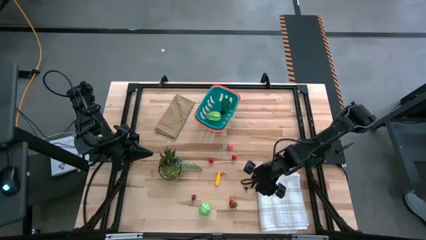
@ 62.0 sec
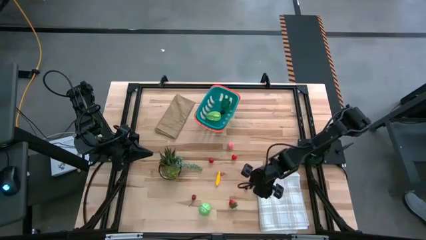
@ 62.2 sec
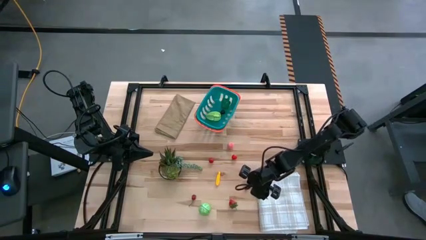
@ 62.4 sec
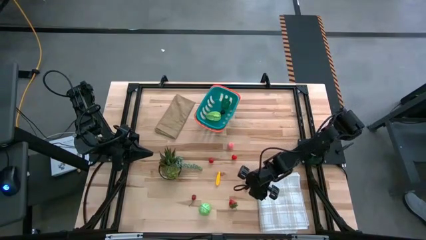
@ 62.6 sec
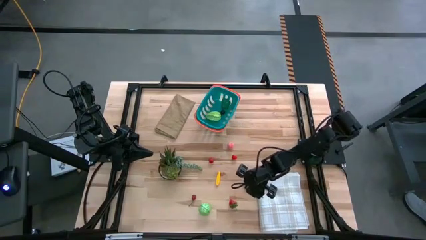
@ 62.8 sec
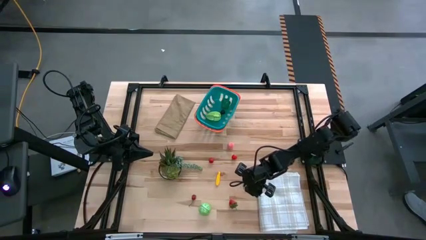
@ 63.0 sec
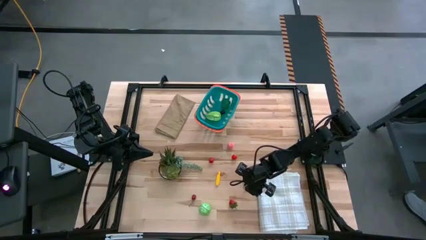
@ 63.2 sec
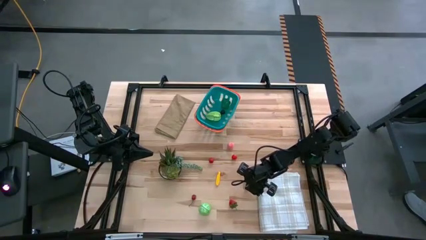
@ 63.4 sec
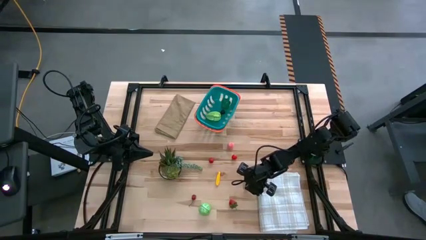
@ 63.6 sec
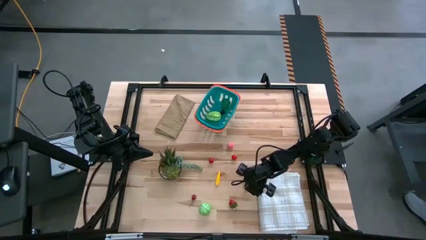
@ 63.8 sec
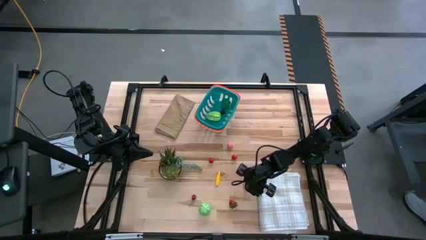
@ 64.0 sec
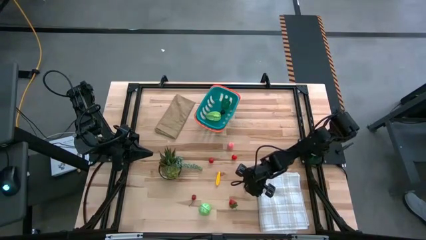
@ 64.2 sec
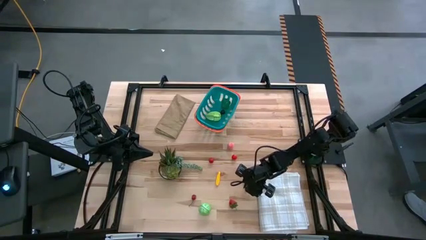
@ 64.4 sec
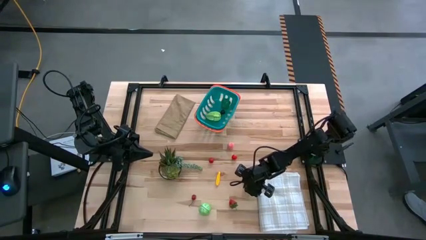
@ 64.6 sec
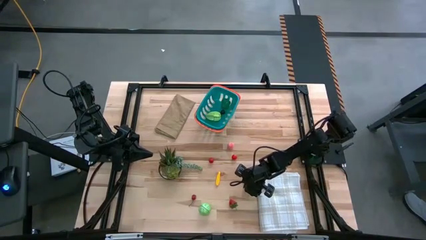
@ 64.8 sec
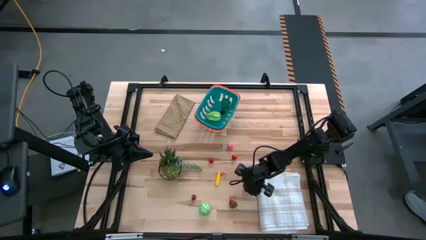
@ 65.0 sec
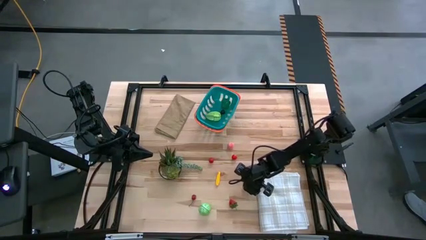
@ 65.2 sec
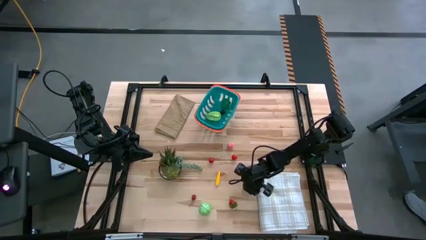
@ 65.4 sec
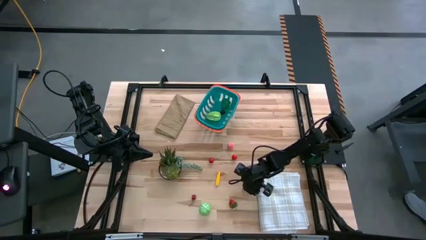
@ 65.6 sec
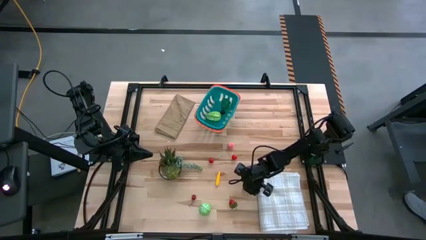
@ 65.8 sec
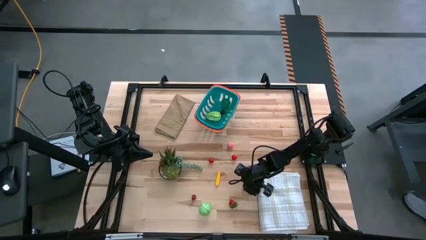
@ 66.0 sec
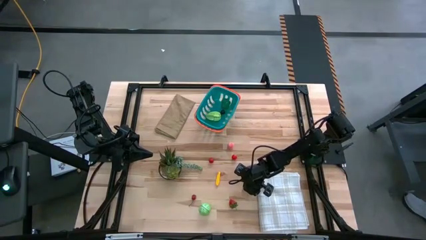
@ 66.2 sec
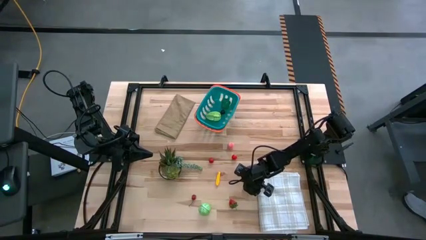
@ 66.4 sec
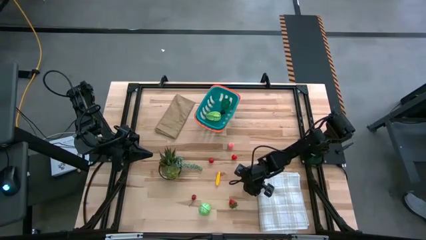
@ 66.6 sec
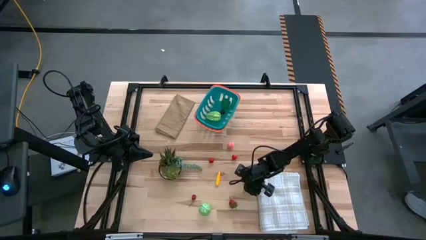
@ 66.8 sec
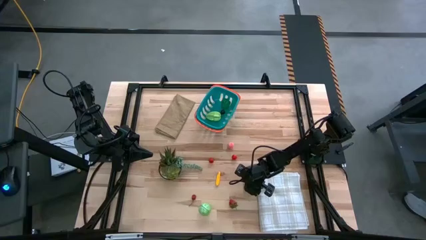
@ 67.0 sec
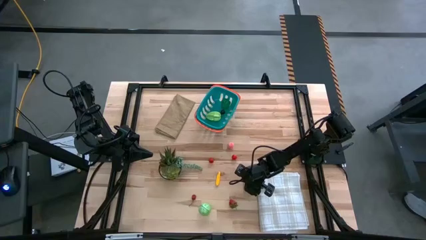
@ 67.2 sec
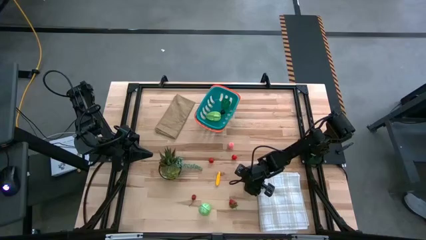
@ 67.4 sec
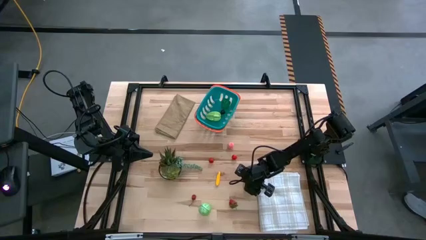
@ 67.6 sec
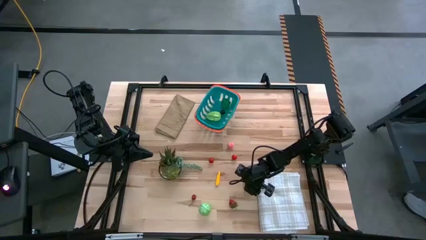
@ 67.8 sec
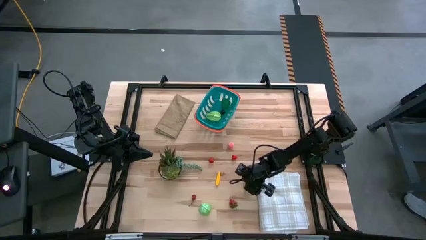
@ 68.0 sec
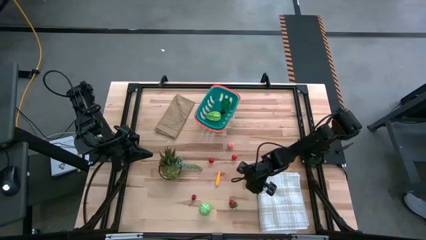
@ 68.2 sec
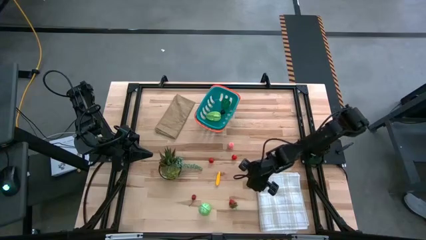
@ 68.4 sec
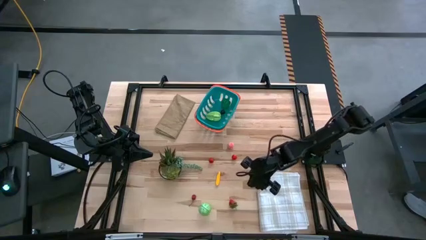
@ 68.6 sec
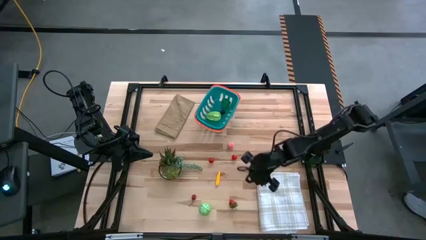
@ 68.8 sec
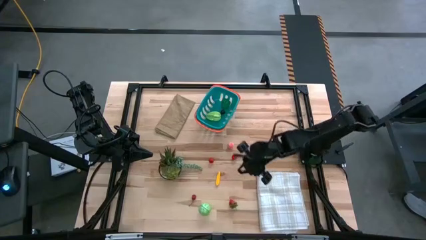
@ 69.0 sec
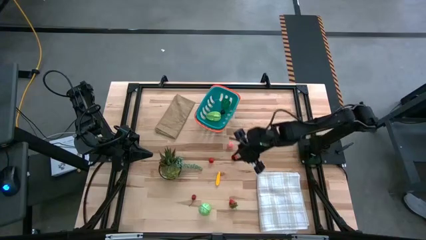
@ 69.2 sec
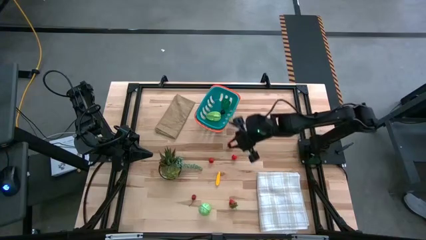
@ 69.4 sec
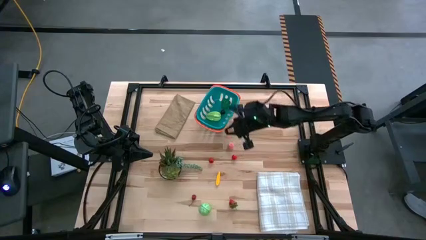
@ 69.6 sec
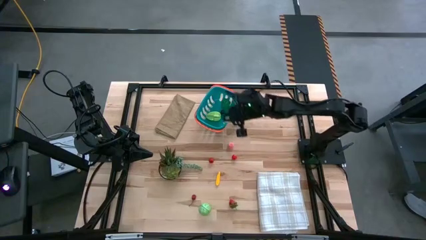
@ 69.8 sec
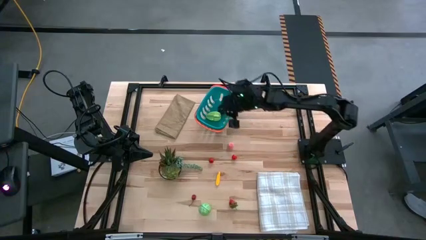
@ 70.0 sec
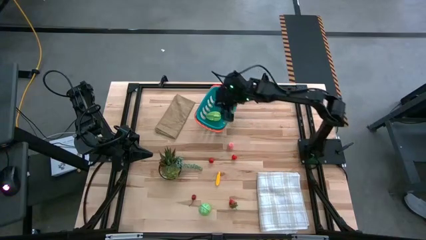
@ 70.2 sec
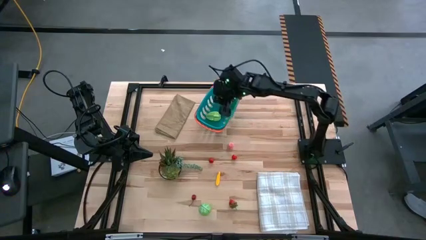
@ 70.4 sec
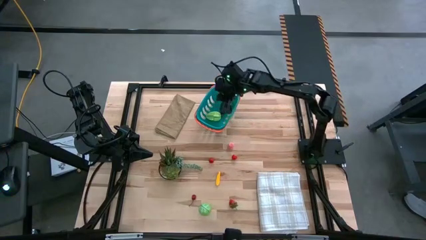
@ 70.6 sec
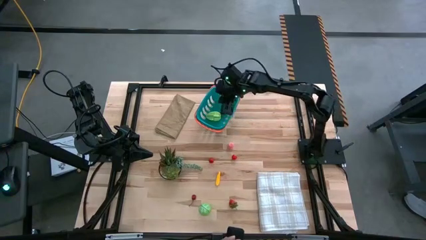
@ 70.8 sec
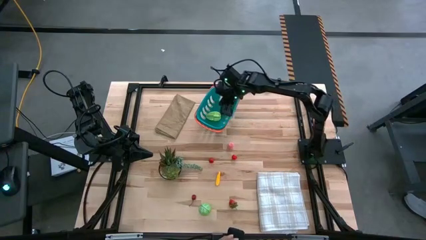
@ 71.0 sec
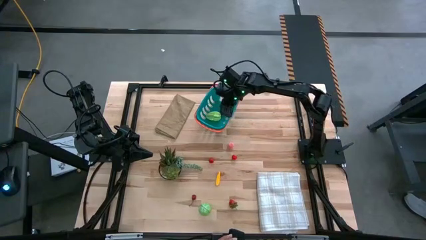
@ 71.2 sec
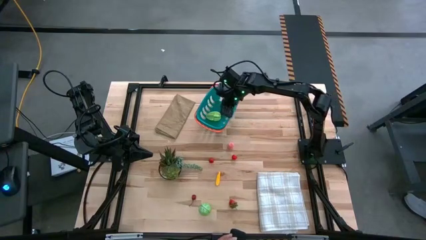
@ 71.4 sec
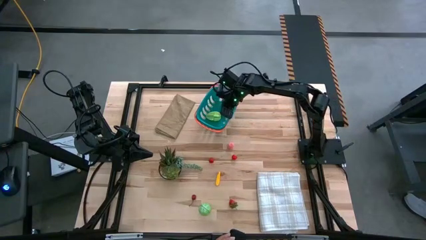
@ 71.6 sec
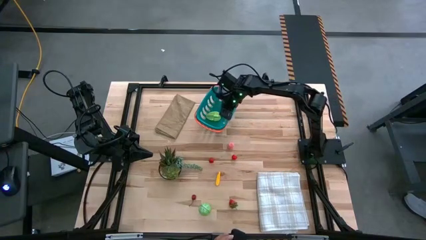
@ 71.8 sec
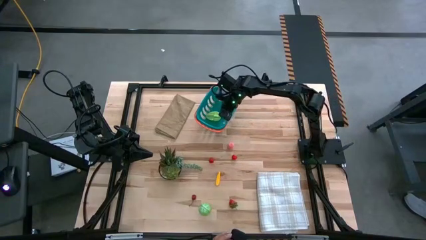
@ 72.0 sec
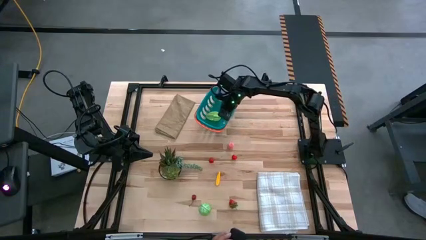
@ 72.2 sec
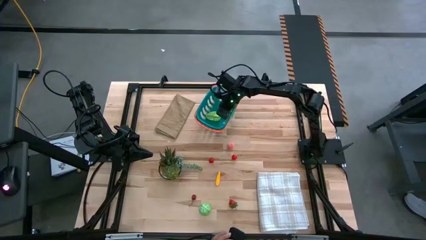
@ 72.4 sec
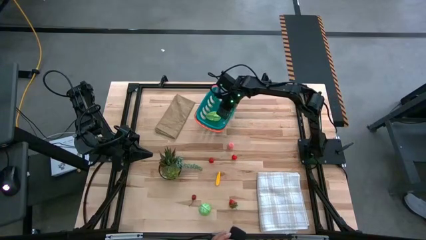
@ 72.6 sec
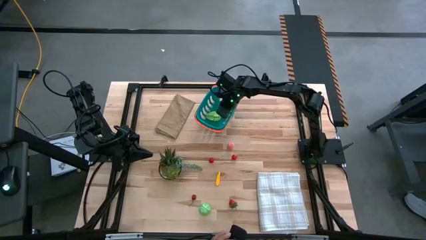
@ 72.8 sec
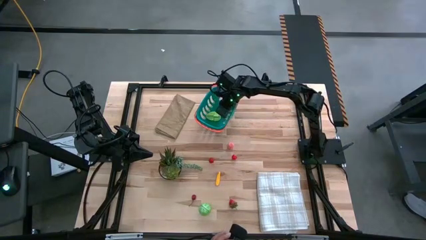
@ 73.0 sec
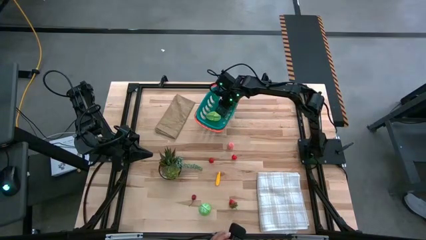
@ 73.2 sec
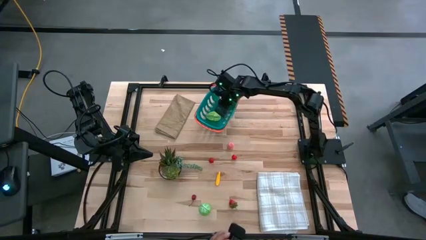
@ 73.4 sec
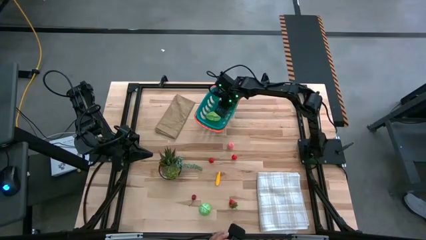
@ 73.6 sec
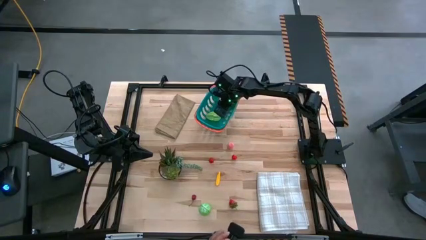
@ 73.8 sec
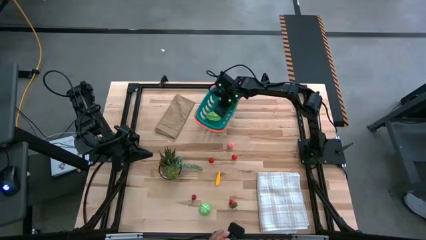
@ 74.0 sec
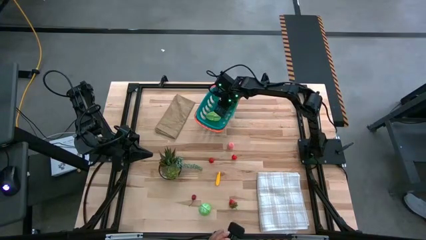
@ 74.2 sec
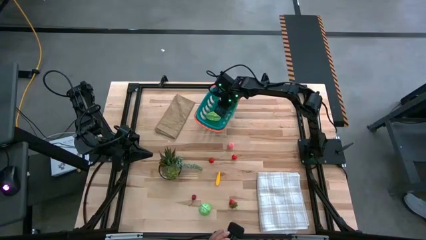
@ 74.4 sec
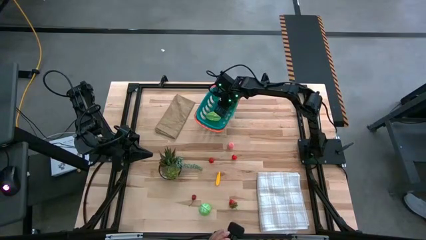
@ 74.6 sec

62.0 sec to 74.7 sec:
Task: Pick and placing Produce into tupperware
Put the black cherry in the green basket
